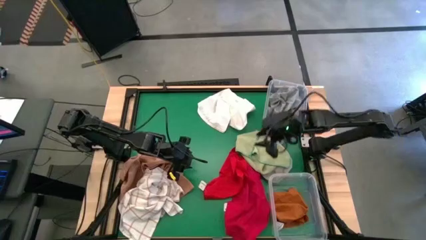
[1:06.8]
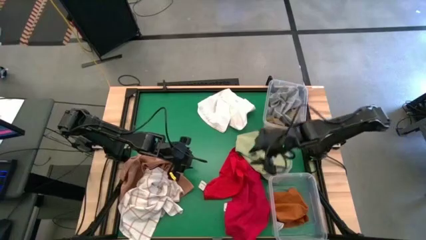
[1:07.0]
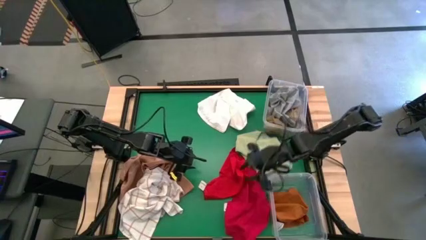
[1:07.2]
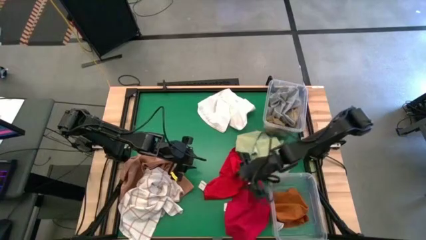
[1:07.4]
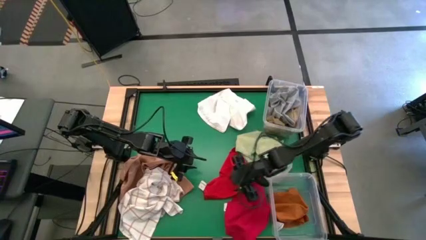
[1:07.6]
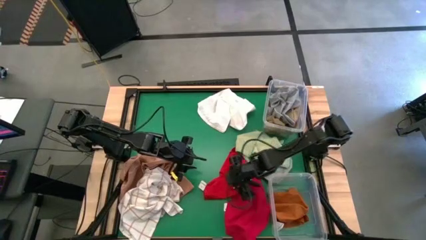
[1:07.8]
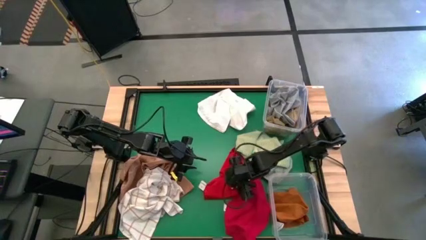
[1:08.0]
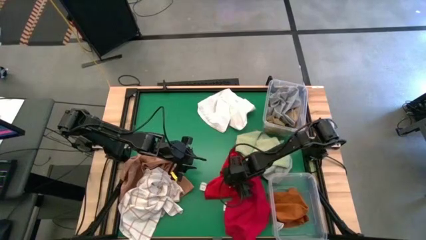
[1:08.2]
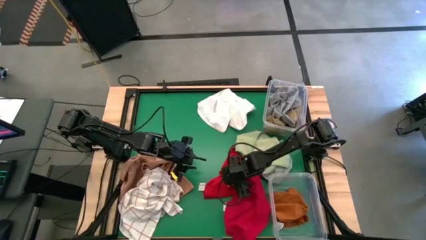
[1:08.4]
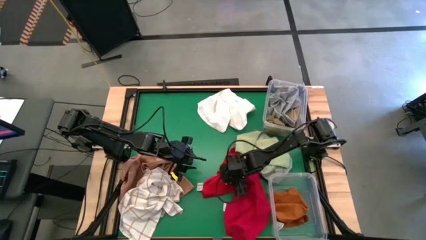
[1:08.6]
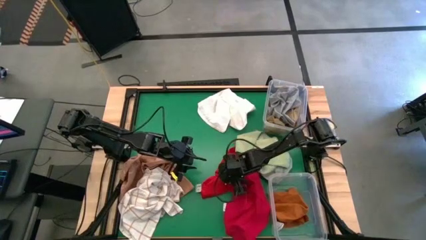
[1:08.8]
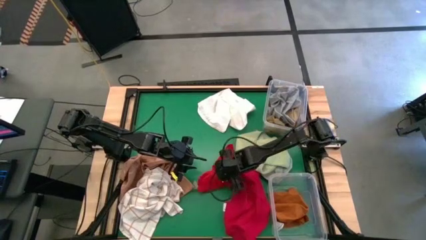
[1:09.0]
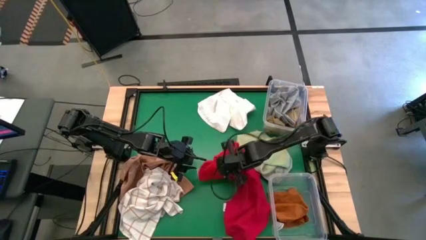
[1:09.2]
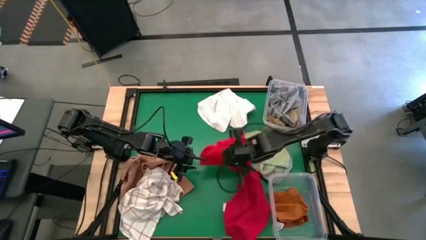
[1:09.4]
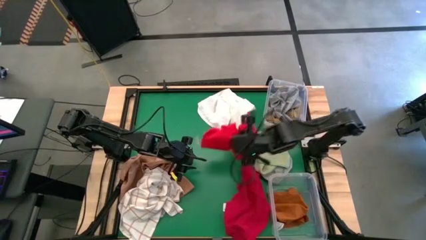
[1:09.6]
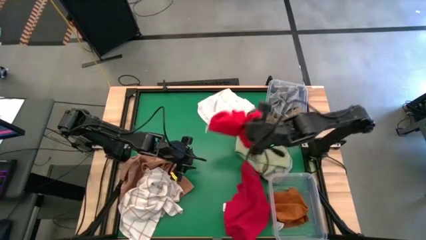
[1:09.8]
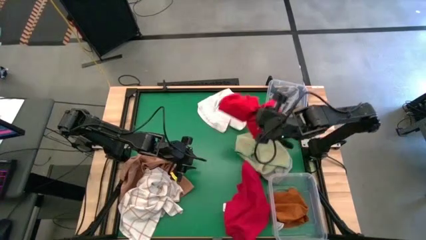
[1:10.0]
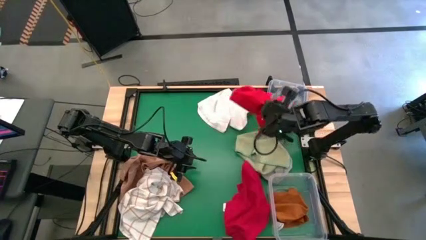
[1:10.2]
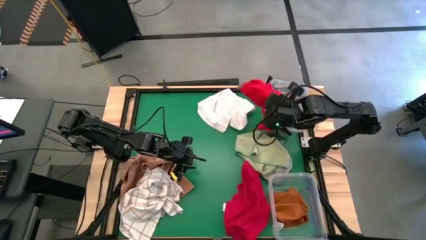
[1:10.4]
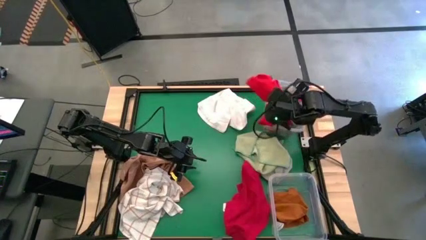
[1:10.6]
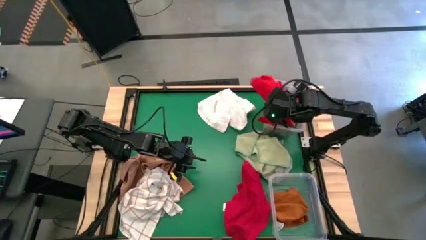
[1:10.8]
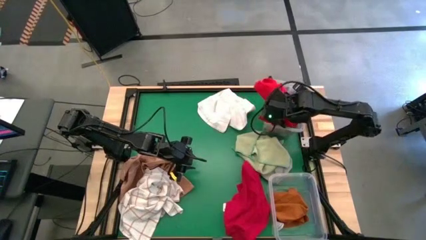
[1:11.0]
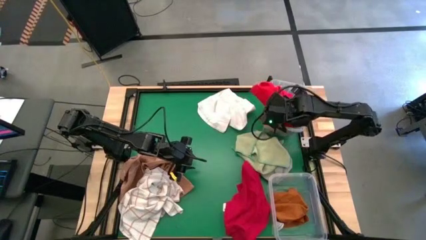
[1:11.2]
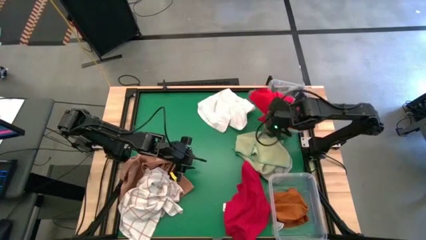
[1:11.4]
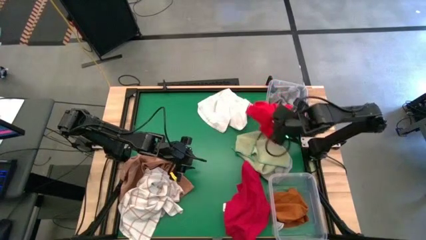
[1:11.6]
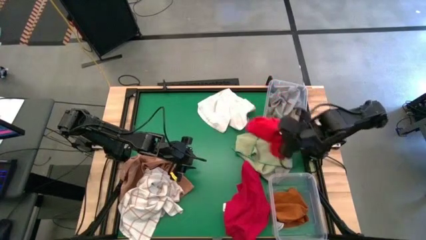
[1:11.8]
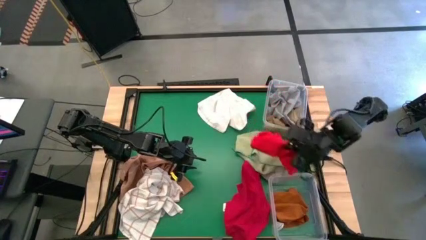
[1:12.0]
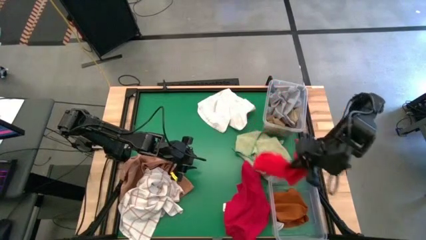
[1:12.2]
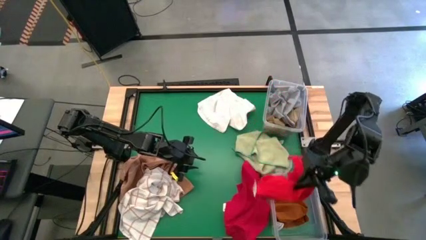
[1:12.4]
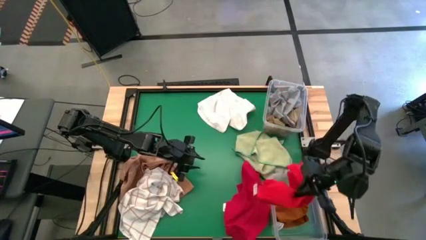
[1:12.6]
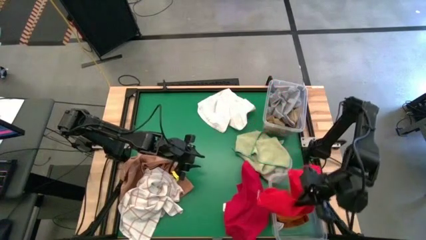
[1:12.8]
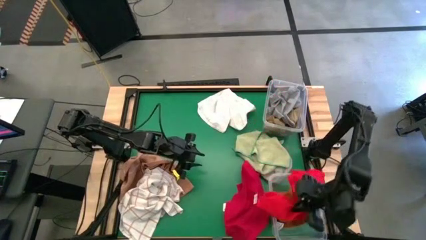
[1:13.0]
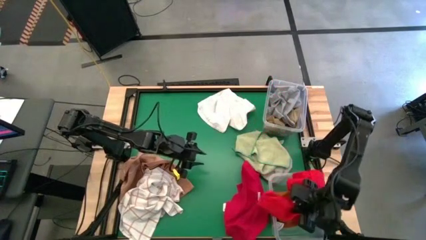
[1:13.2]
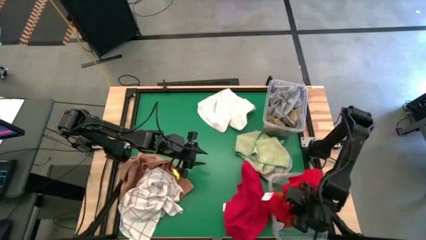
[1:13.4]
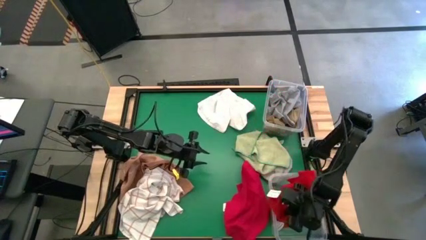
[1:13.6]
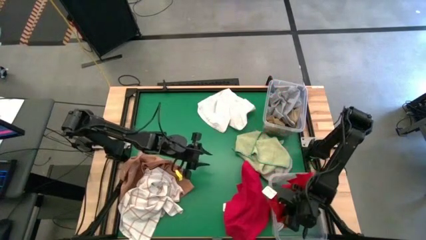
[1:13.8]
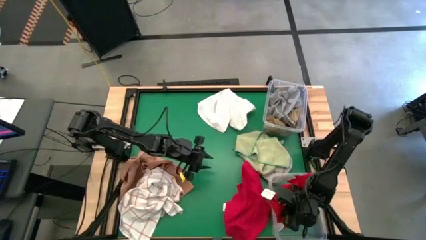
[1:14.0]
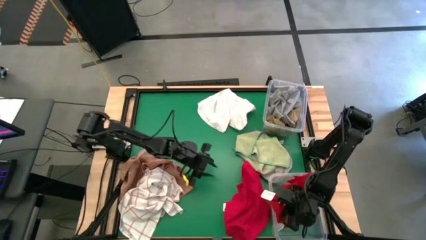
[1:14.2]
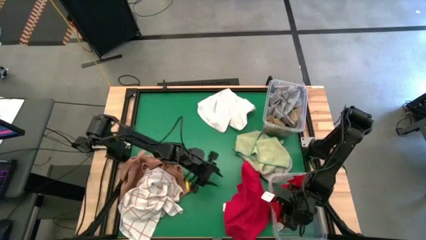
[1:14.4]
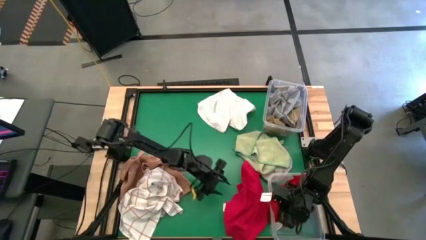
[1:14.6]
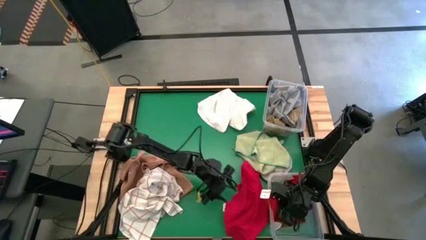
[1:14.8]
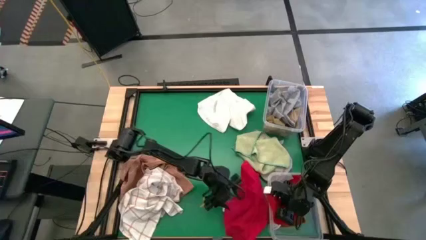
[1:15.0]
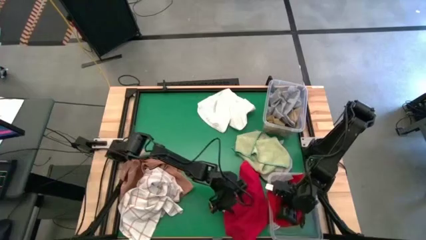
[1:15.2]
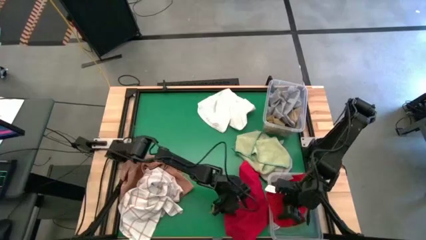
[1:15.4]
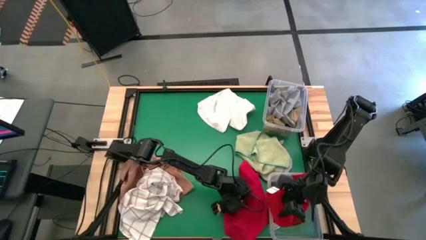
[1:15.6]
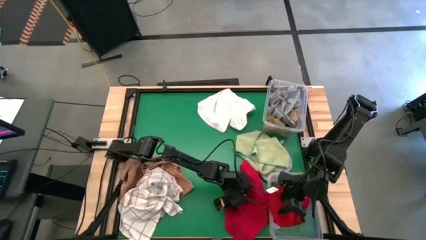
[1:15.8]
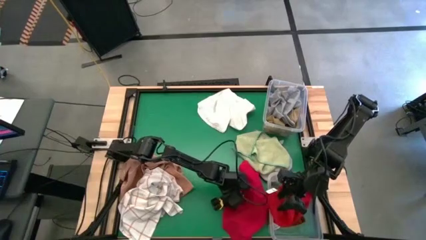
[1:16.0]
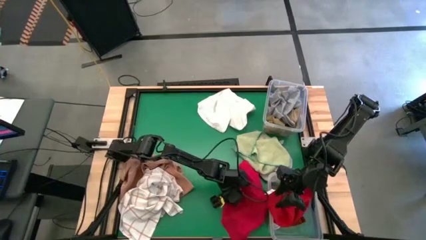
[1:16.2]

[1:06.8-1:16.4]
Task: Sort towels by color in basket
Put the top red towel into the bottom transparent bin

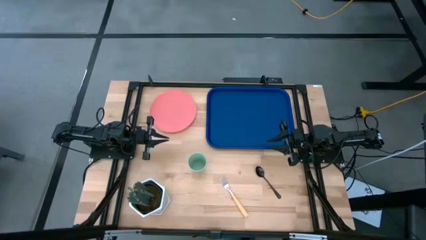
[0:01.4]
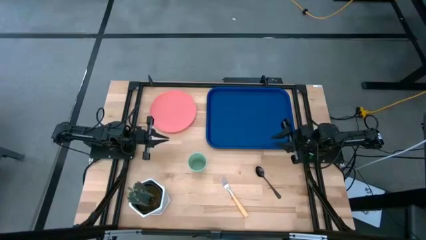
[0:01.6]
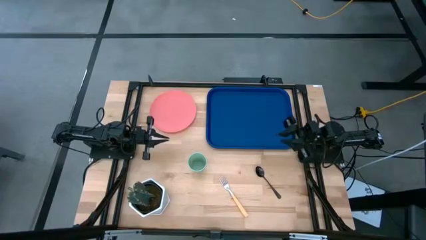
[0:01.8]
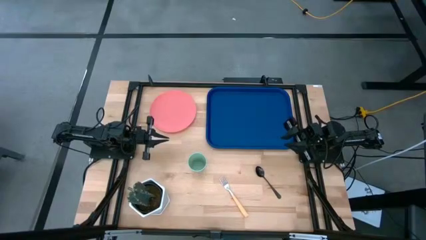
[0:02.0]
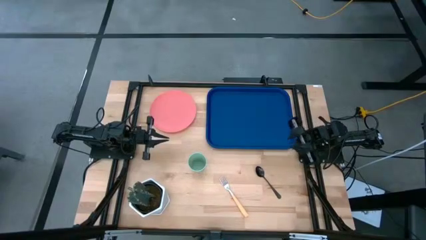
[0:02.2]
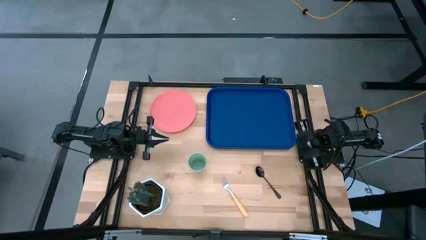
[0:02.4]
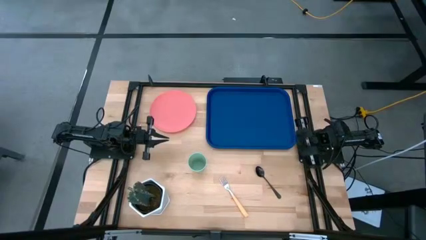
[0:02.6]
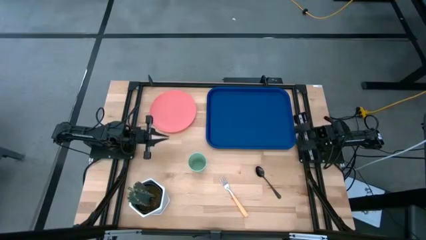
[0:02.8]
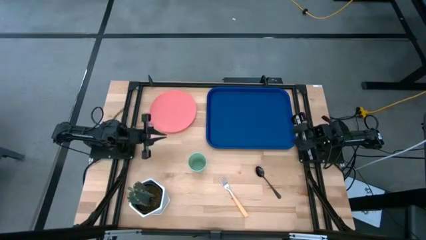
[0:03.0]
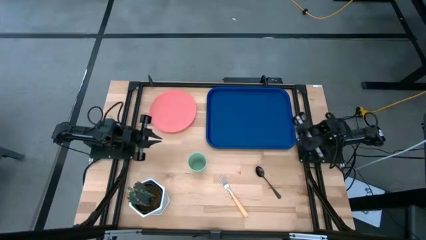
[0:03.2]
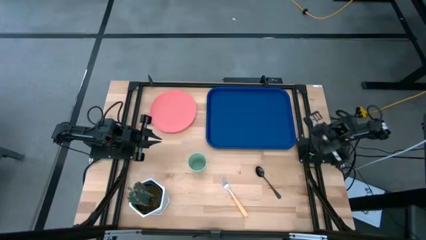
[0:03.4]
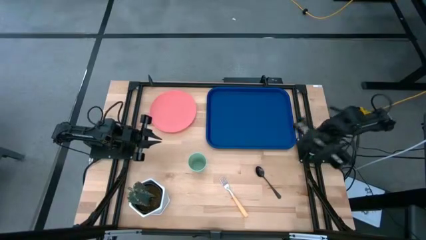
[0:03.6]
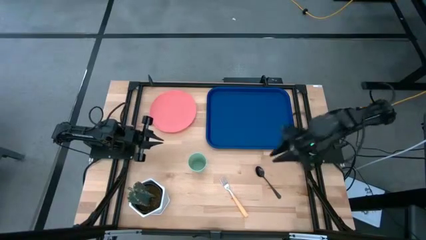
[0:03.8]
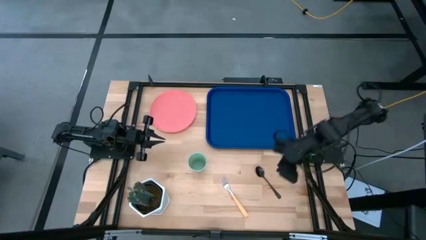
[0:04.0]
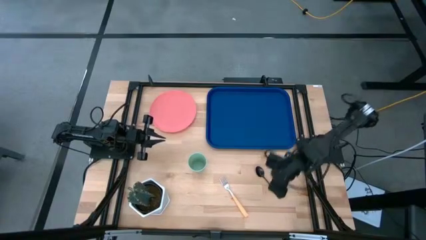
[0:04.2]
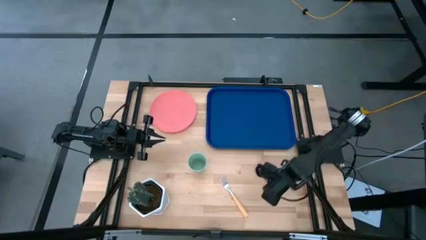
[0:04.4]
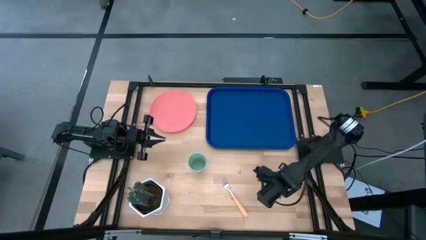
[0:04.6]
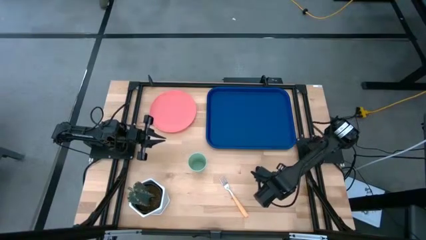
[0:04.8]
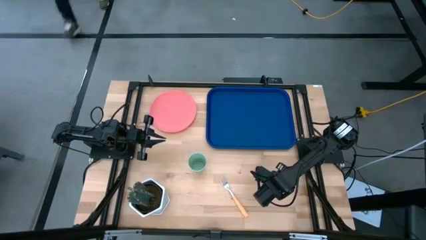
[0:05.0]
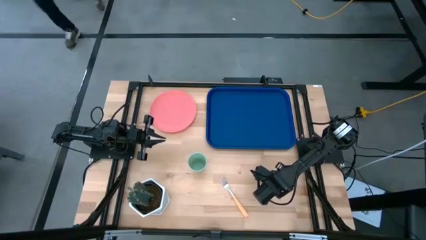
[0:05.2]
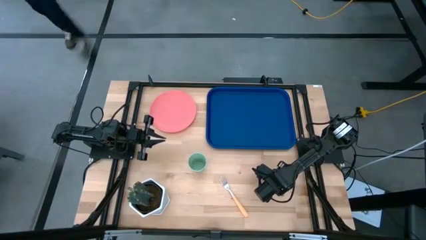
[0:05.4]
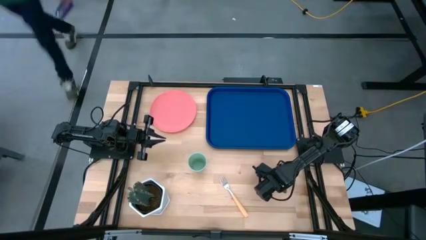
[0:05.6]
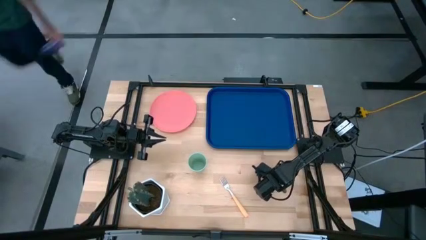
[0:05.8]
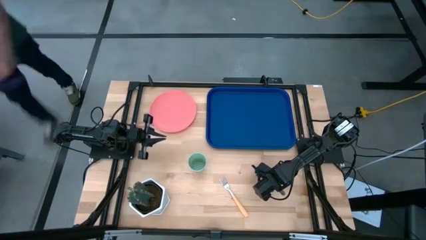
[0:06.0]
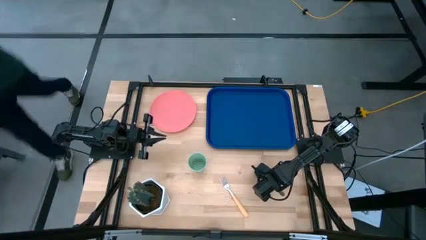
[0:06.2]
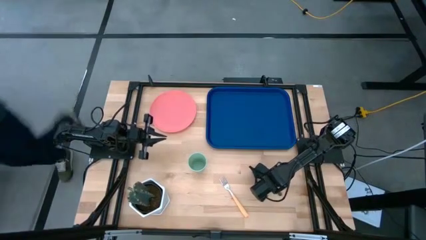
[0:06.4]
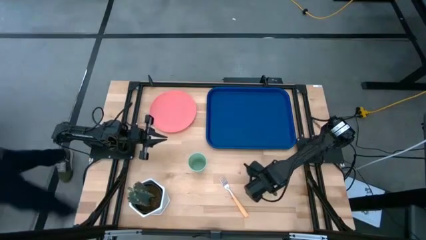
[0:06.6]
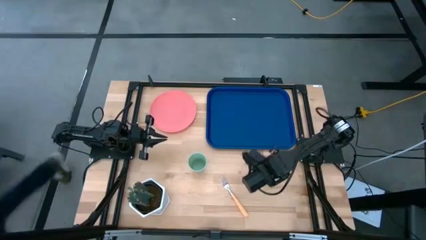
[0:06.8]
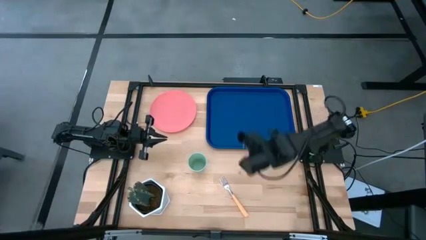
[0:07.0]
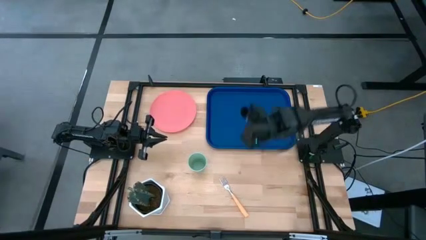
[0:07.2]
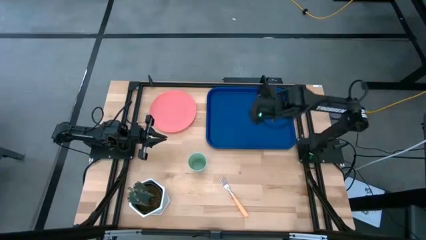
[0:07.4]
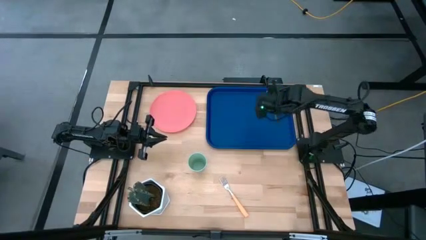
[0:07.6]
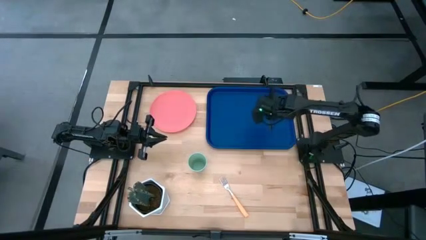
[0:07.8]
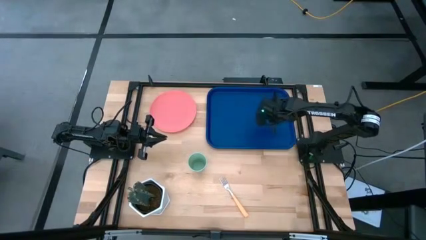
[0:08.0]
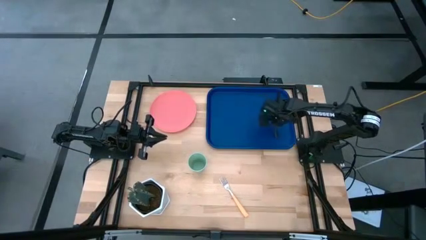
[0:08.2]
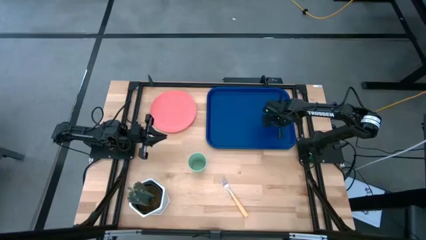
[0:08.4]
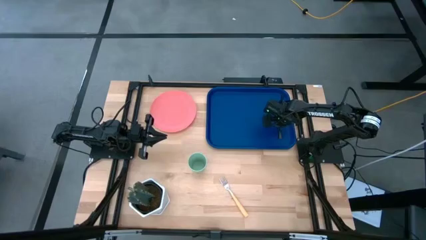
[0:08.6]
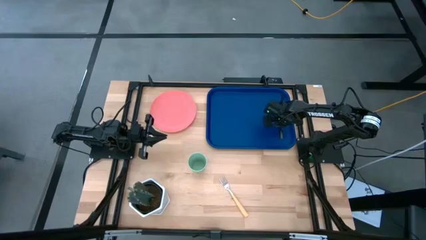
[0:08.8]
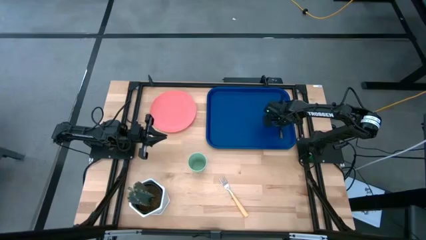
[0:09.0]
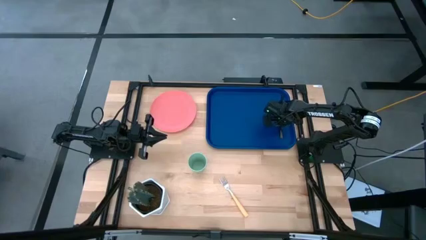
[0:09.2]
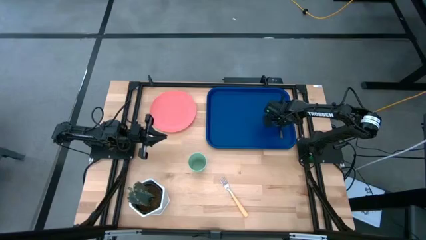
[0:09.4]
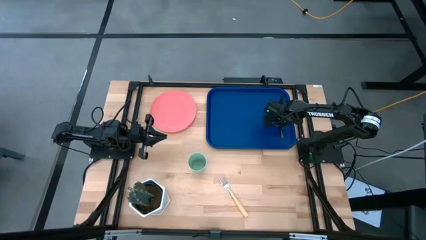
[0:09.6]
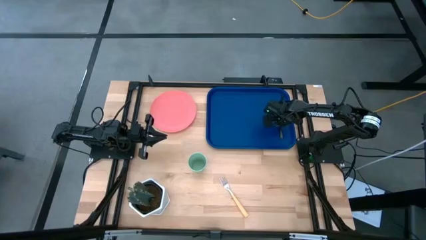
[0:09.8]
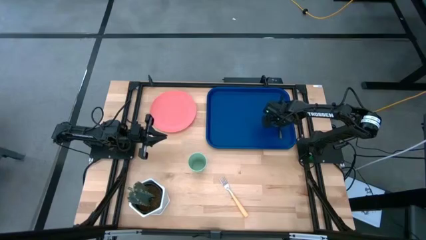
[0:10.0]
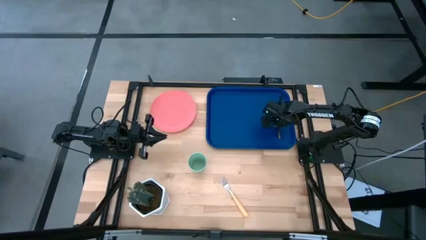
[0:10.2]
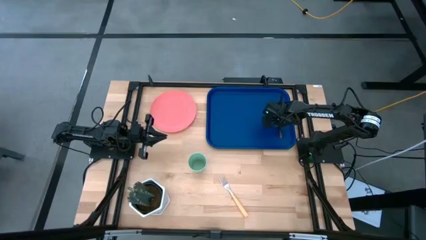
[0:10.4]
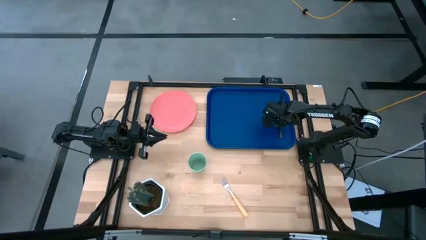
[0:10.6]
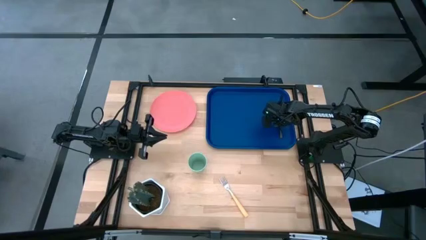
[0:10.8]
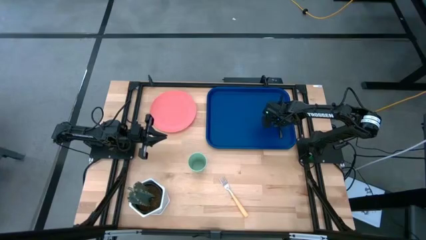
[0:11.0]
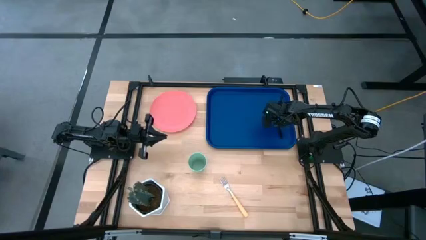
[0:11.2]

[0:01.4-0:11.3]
Task: Pick and place plate/cup/fork/spoon on tray
Put the black spoon on the right side of the dark blue tray
